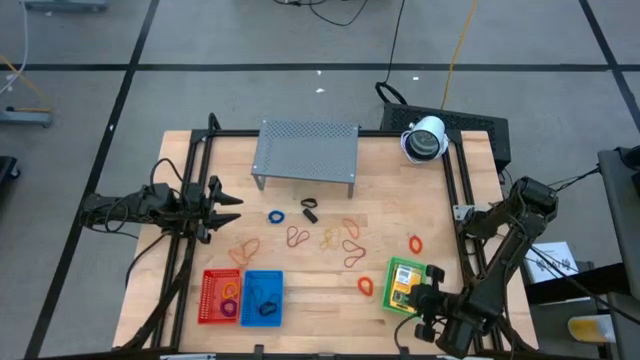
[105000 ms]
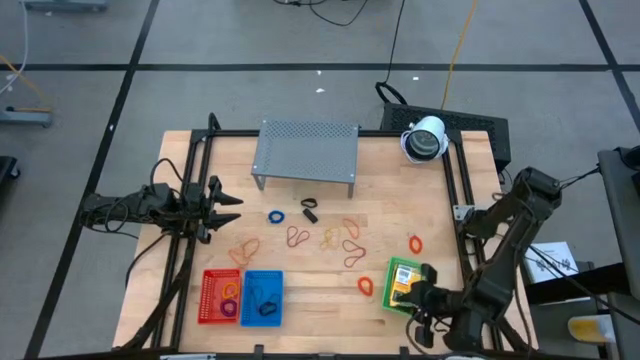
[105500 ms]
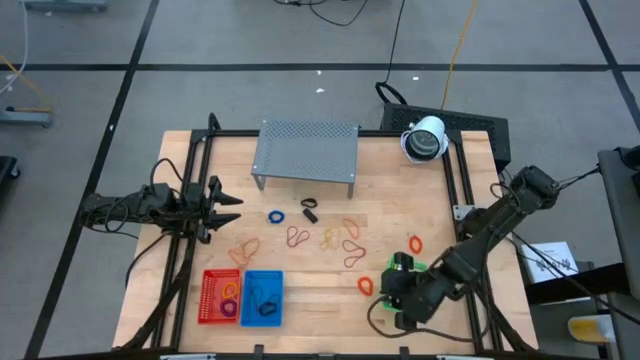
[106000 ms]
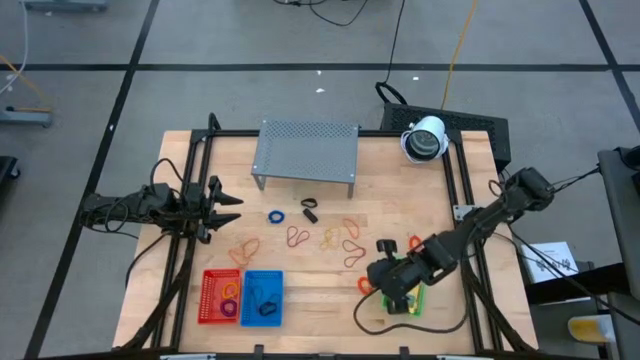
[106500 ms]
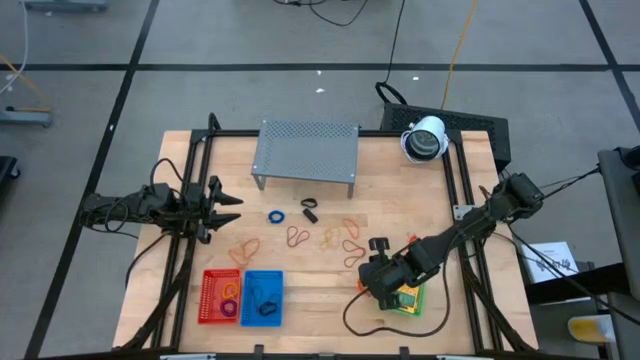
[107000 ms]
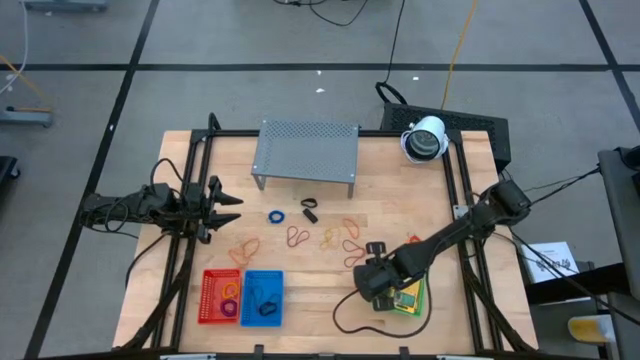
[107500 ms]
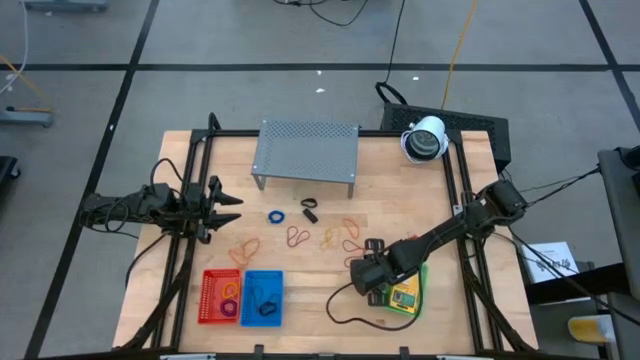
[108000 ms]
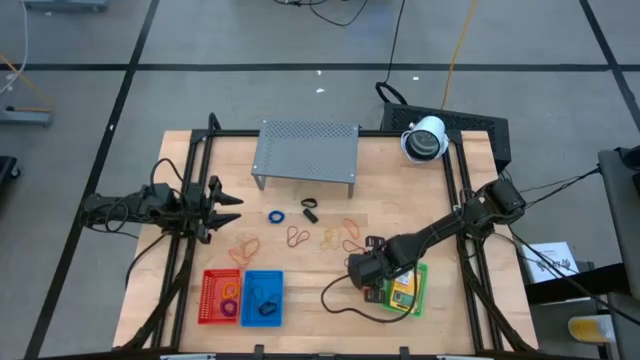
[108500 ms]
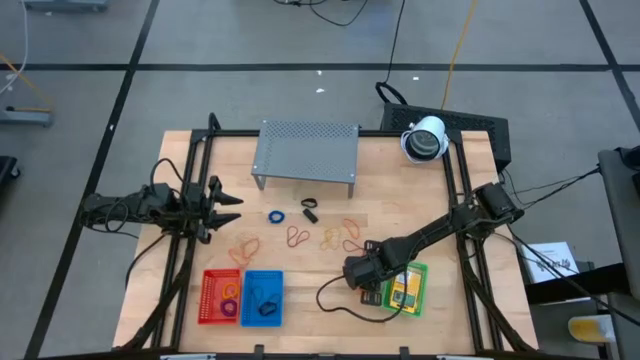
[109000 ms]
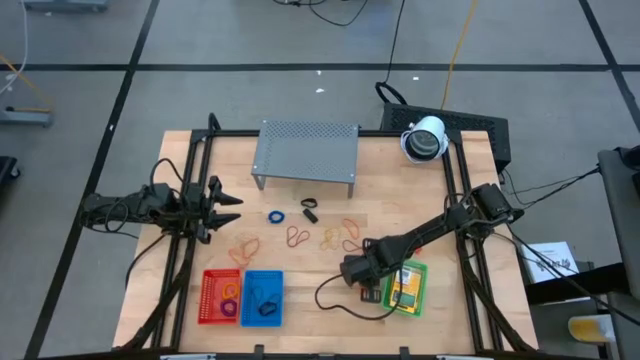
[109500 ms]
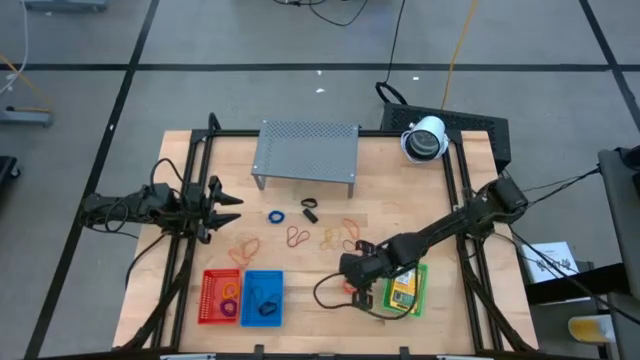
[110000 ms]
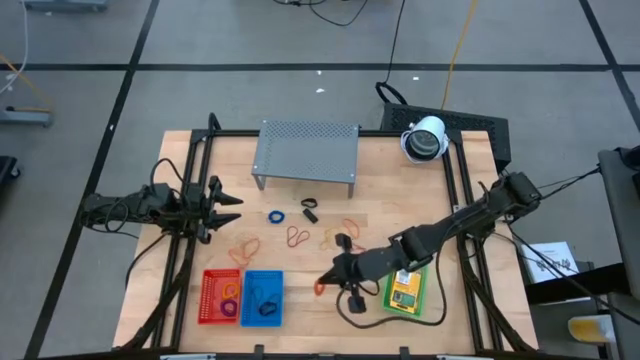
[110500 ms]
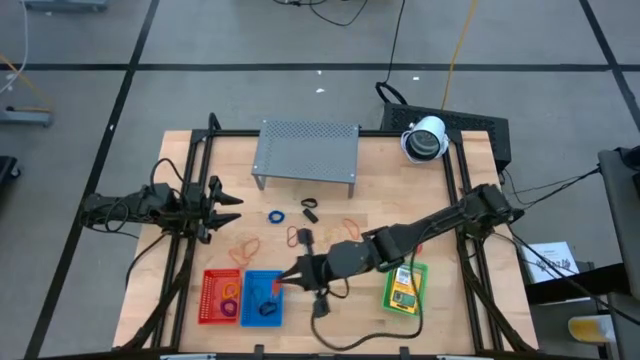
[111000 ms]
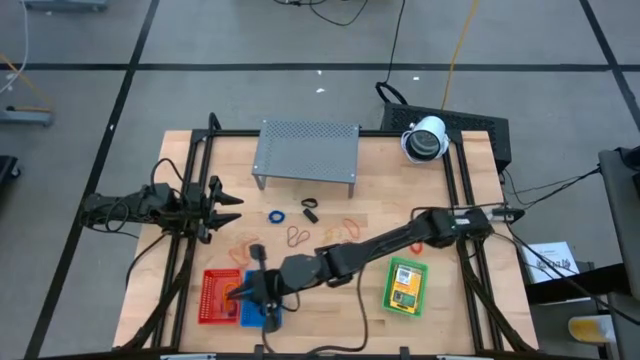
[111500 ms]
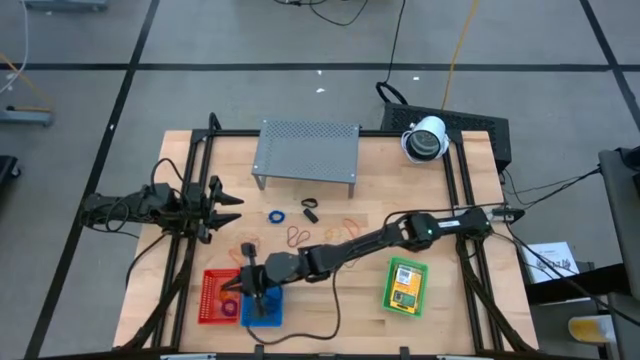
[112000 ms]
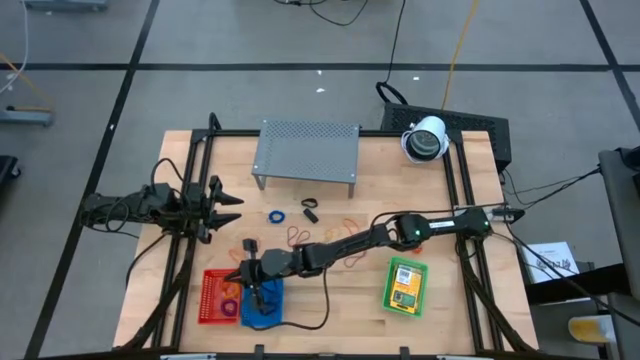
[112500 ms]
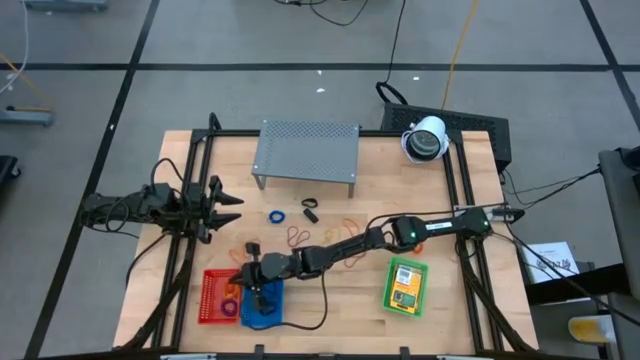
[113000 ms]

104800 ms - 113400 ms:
Task: Pick & Place Office Desk Supplies
Put the red spring keychain into the red bin

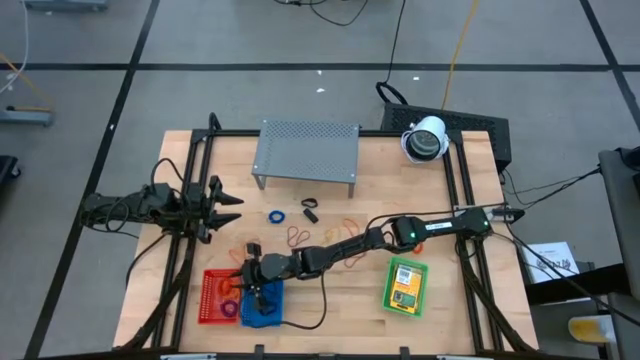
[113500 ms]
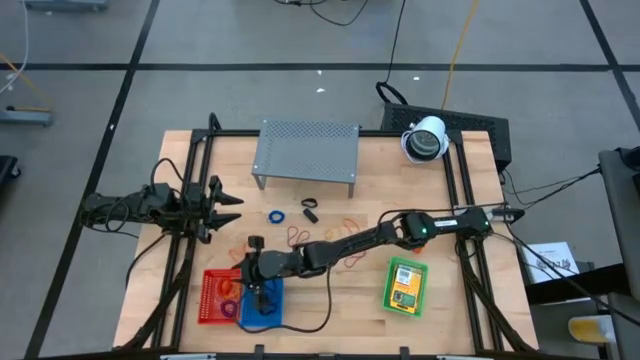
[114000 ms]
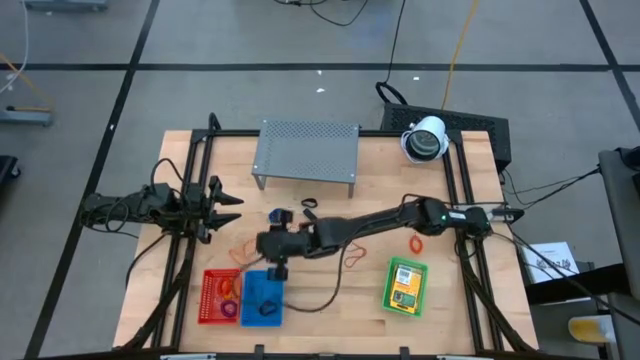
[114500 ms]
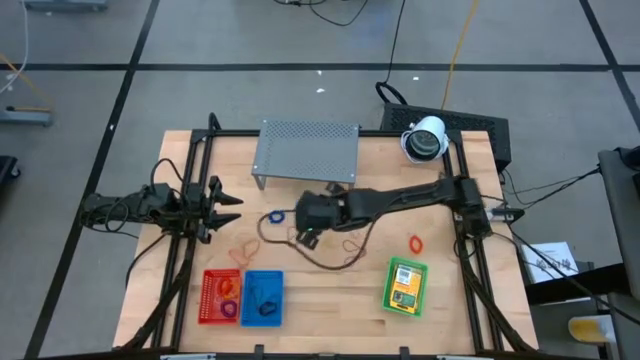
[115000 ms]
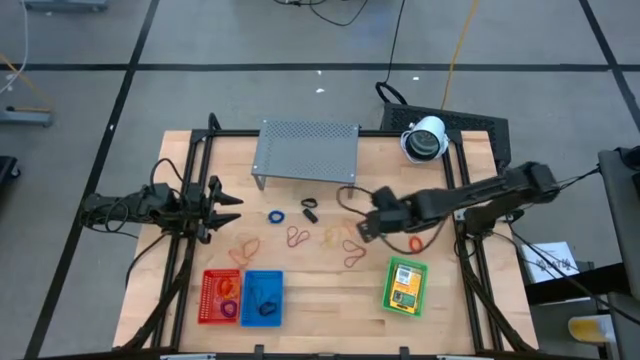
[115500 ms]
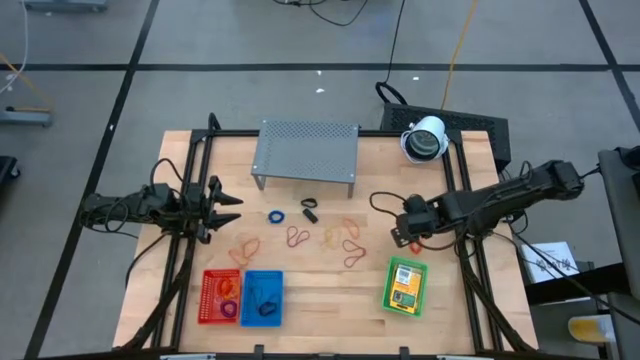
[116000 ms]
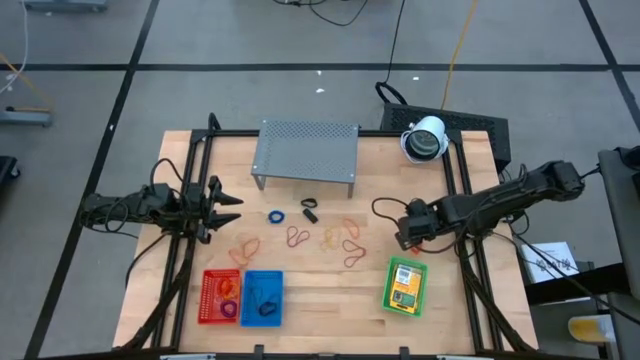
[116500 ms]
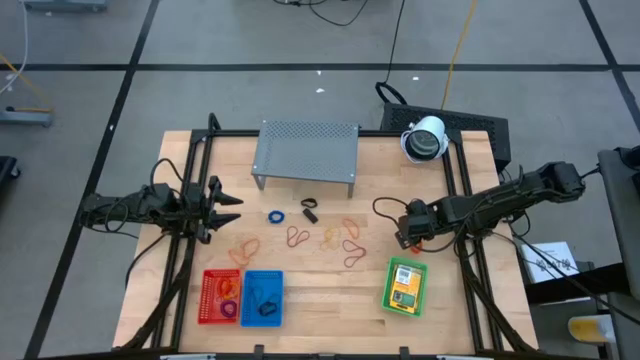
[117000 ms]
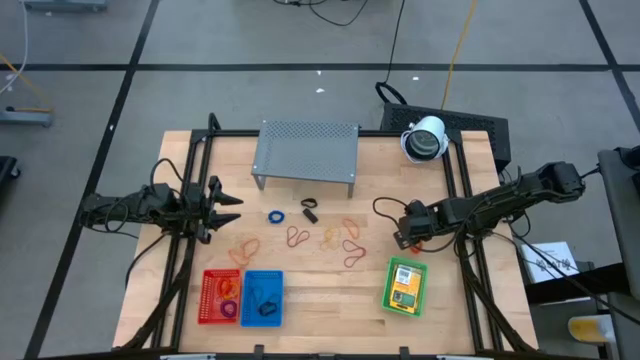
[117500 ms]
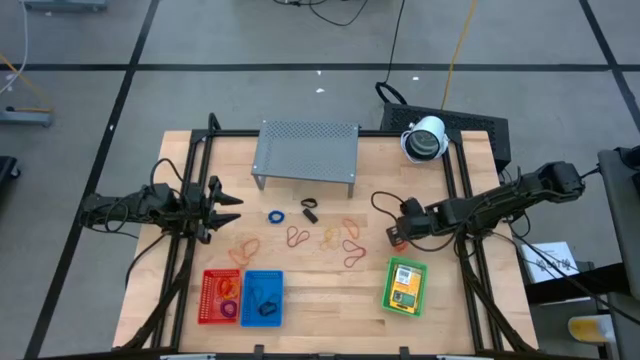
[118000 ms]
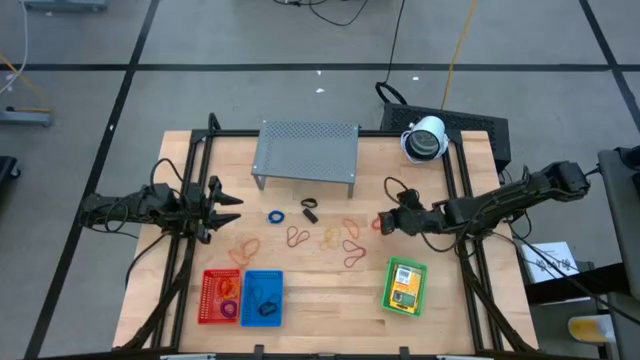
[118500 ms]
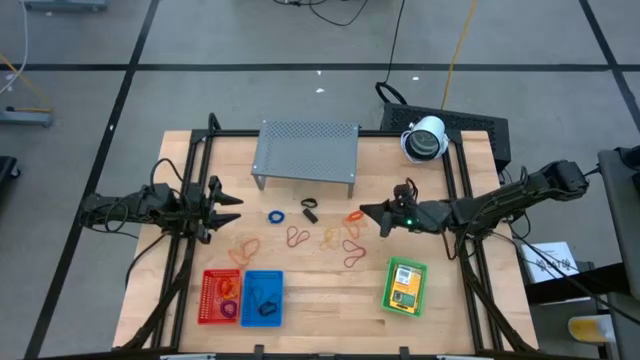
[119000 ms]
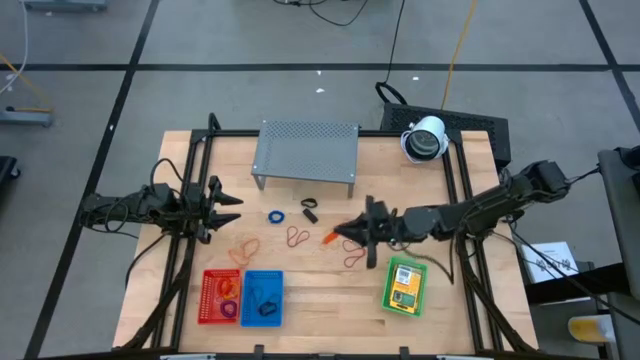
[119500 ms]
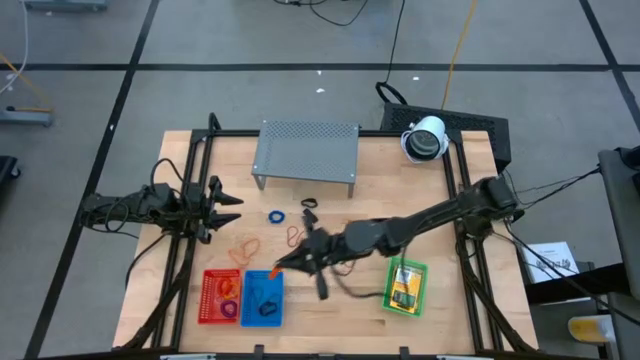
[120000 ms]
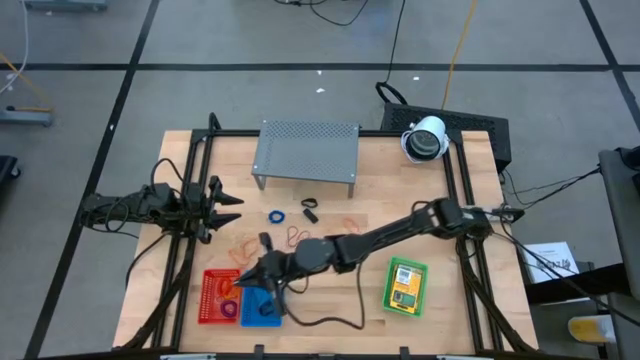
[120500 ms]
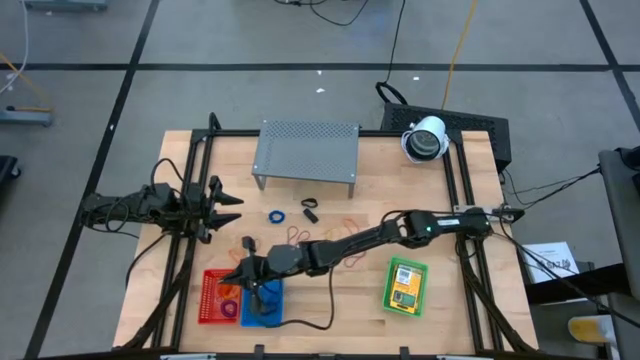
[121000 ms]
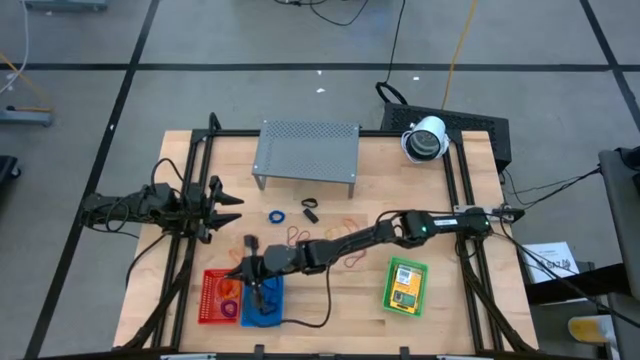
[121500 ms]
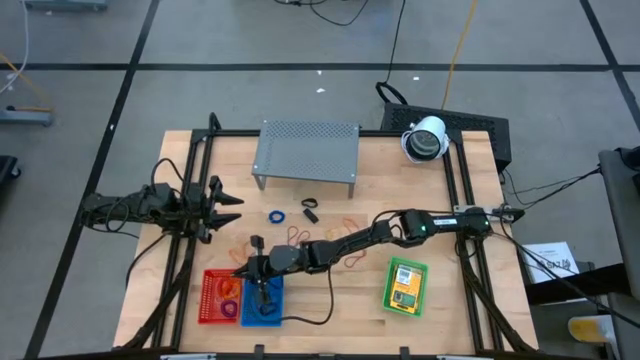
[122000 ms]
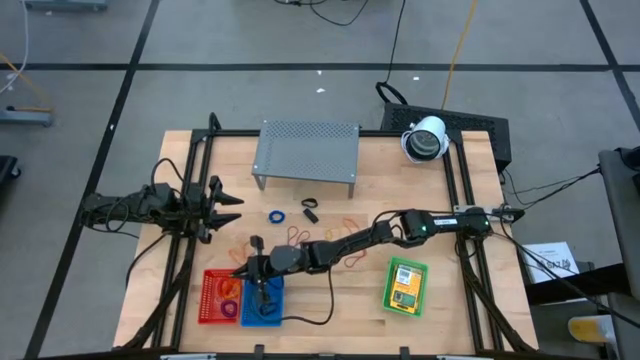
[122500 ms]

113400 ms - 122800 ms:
Put the red spring keychain into the red bin

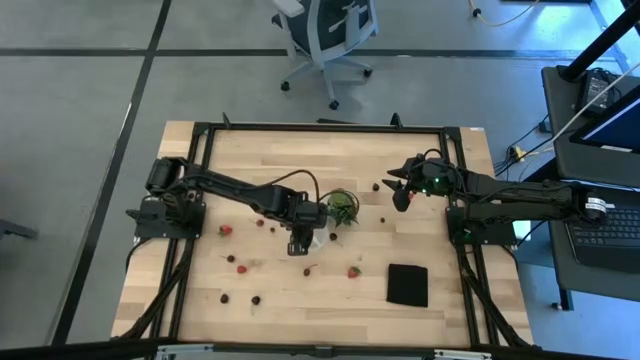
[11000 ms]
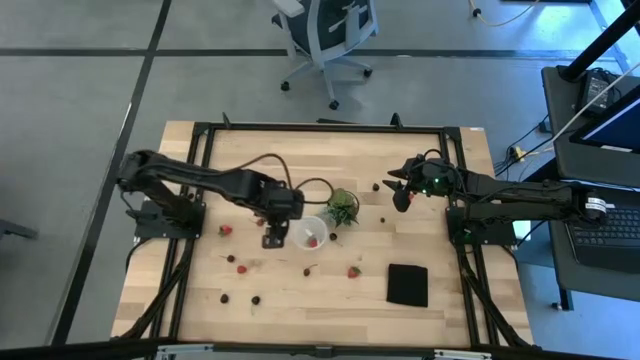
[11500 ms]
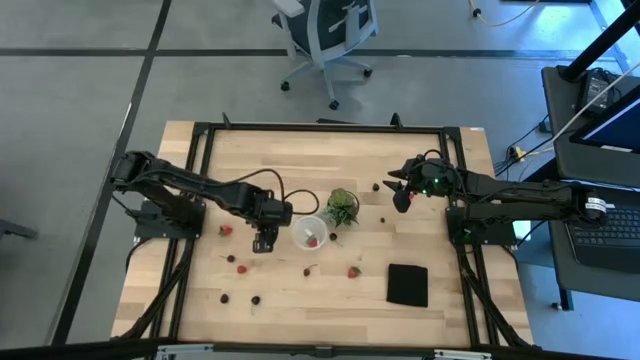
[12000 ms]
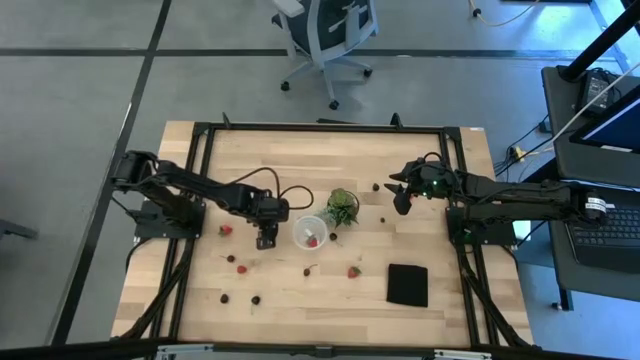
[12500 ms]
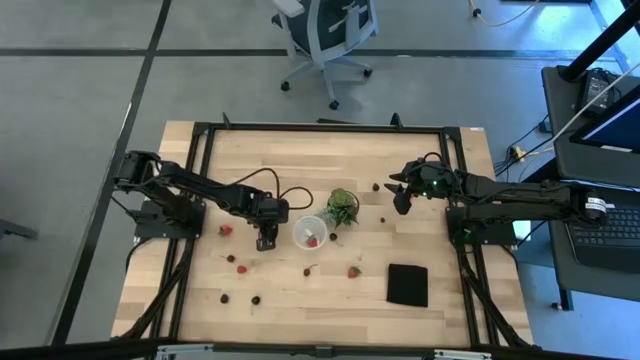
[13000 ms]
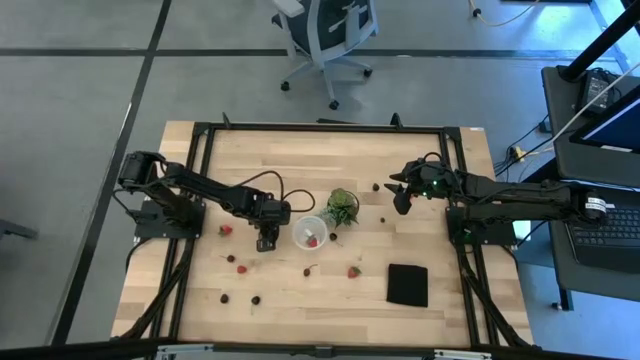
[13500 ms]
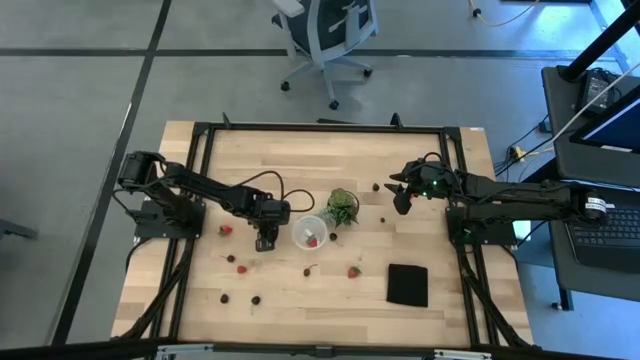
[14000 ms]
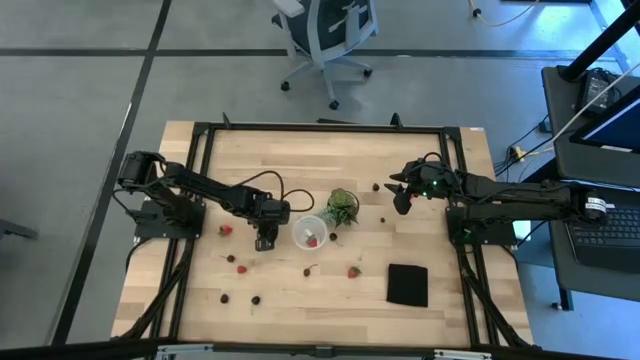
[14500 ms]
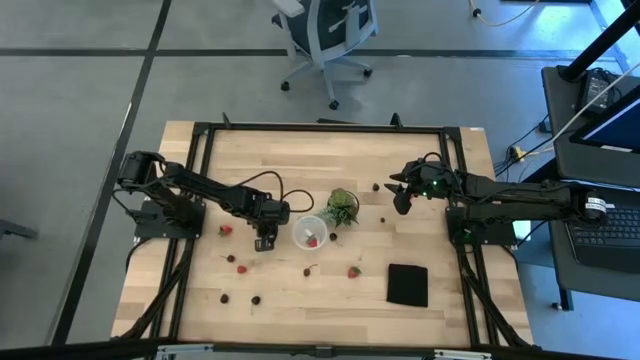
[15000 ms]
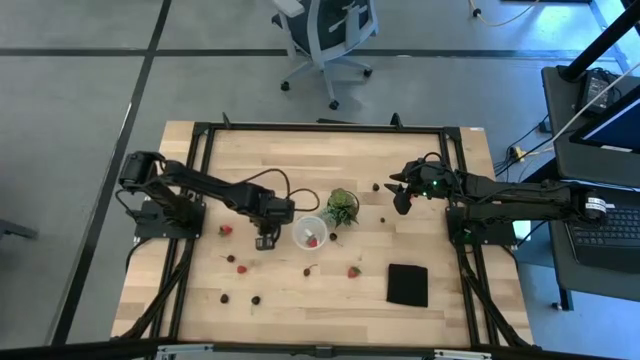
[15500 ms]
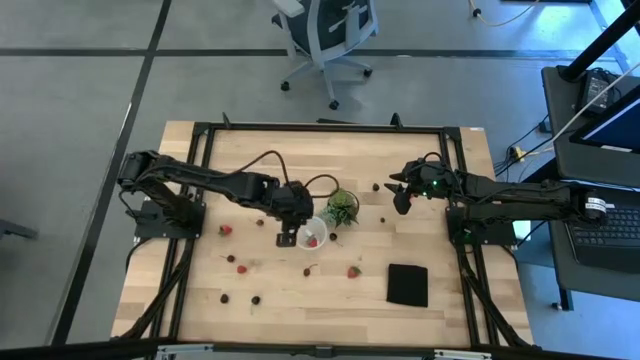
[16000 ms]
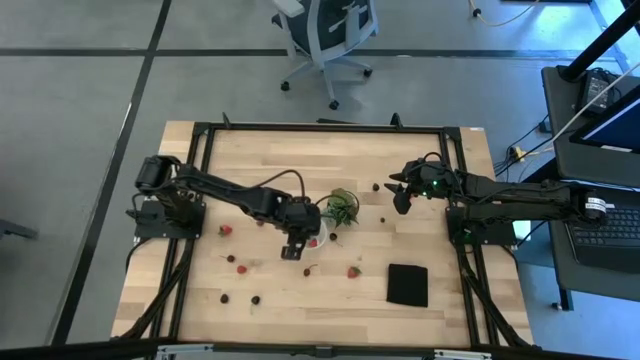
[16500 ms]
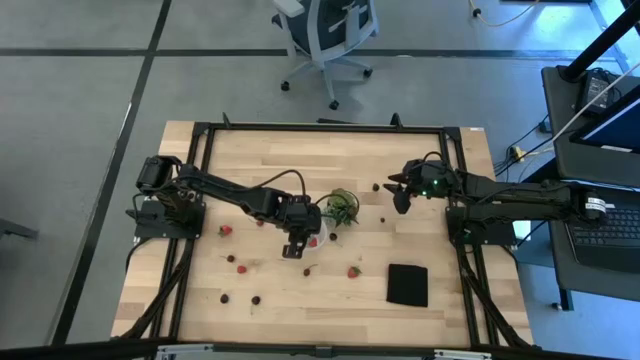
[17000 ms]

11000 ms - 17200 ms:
Task: Pick and placing Produce into tupperware
Put the left blueberry into the transparent container
